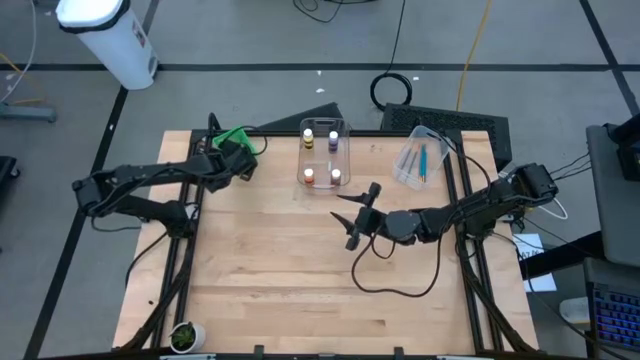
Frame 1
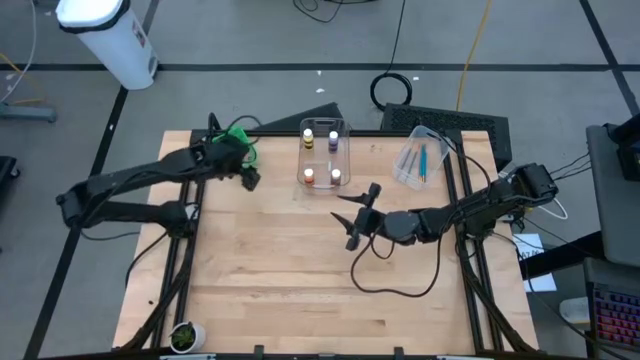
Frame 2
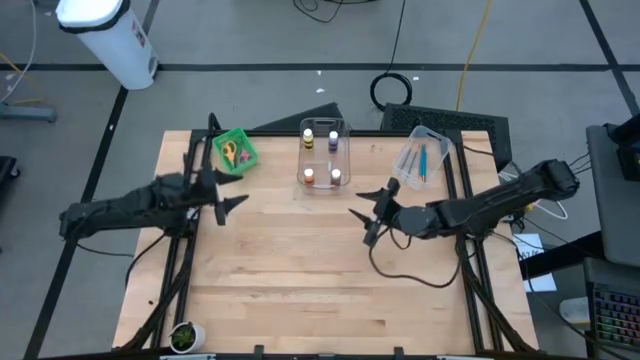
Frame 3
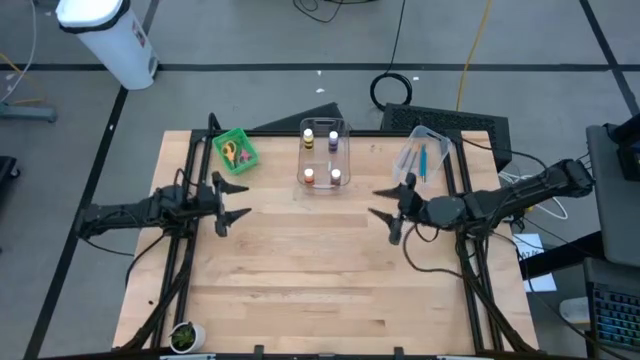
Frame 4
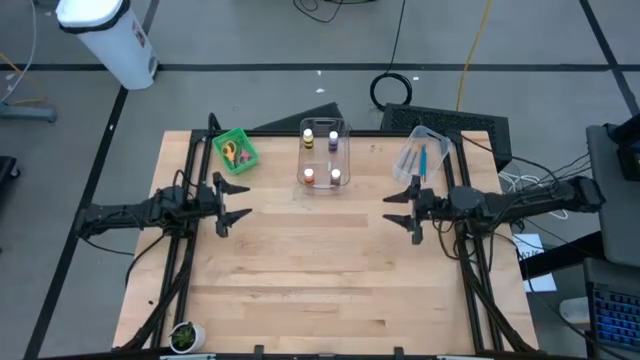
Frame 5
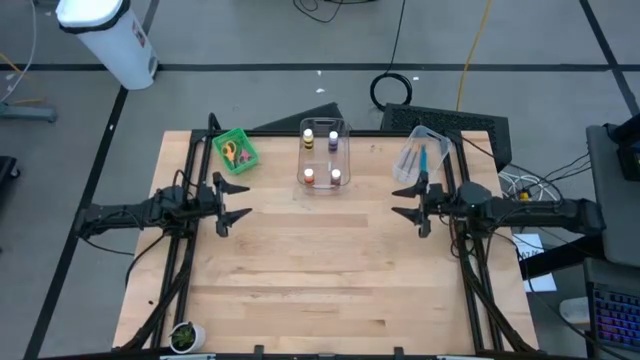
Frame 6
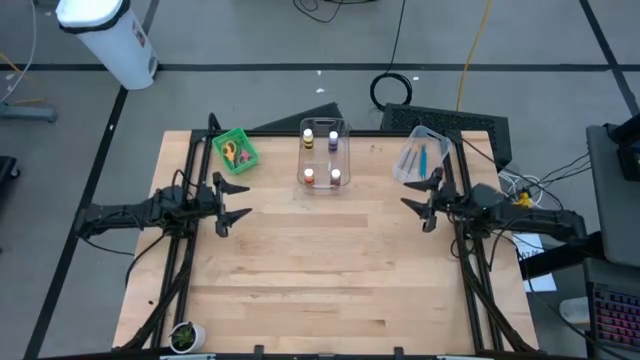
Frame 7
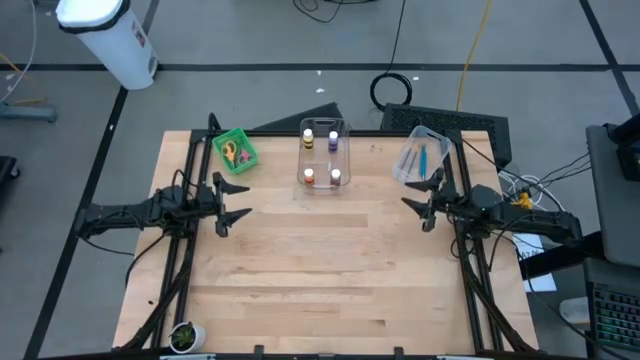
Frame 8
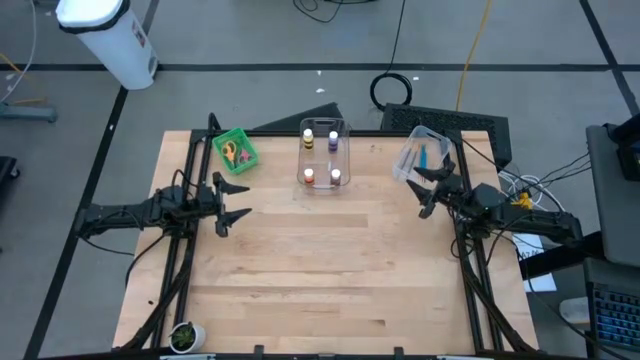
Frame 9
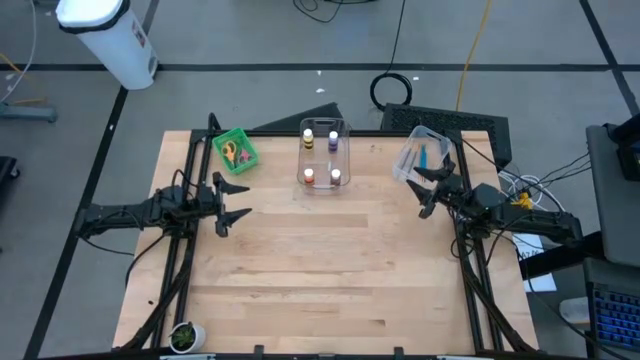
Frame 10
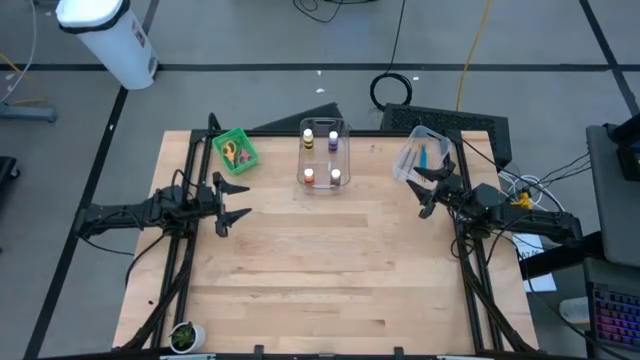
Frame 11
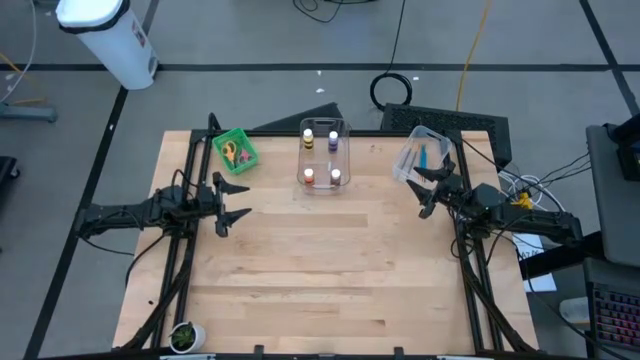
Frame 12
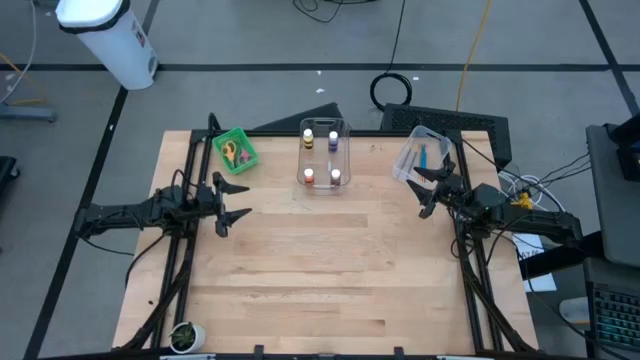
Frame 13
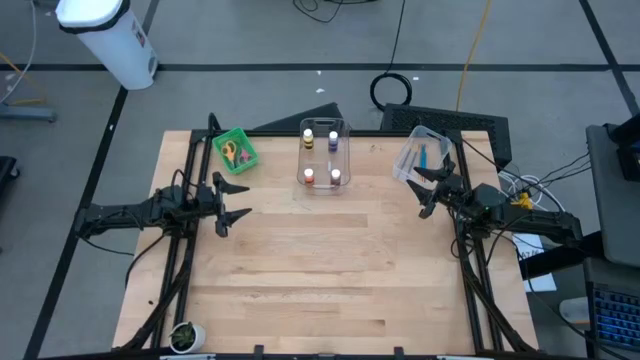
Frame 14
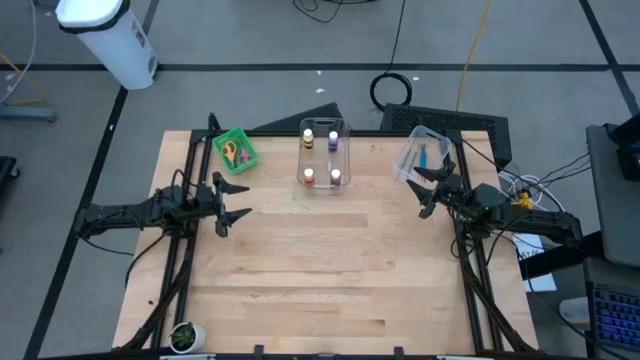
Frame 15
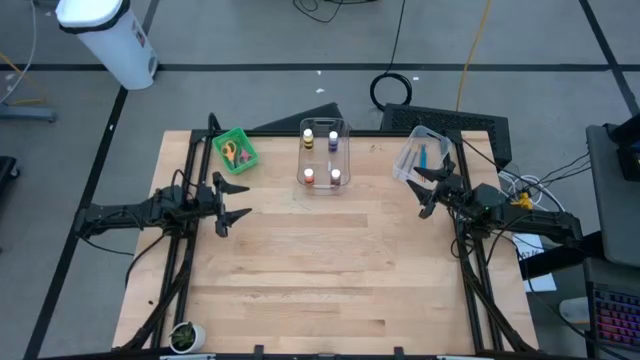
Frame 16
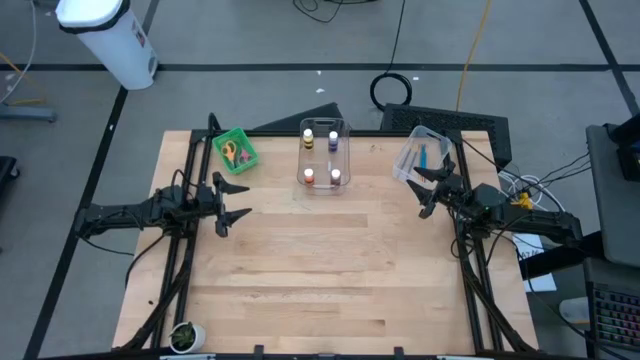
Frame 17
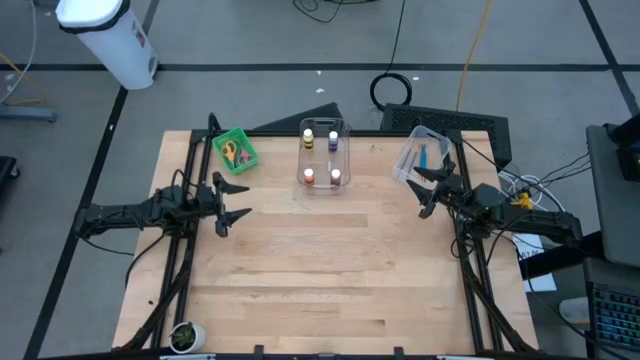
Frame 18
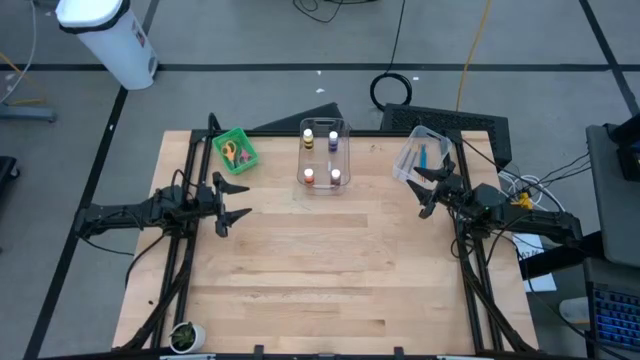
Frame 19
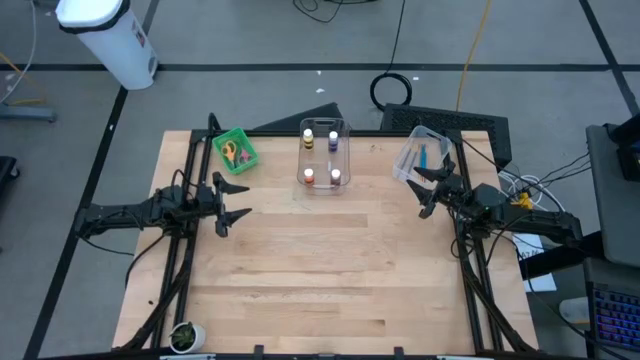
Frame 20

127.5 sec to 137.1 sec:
Task: Pick & Place Paint Supplies
Return to Home Position

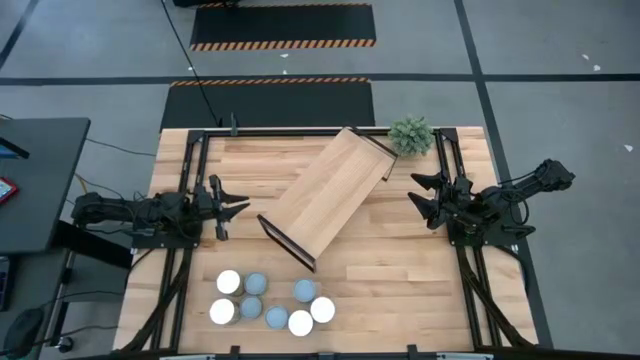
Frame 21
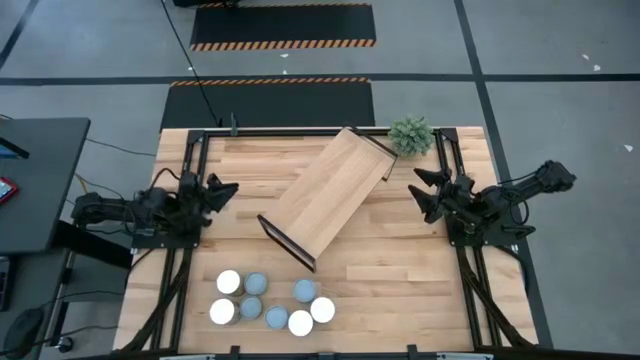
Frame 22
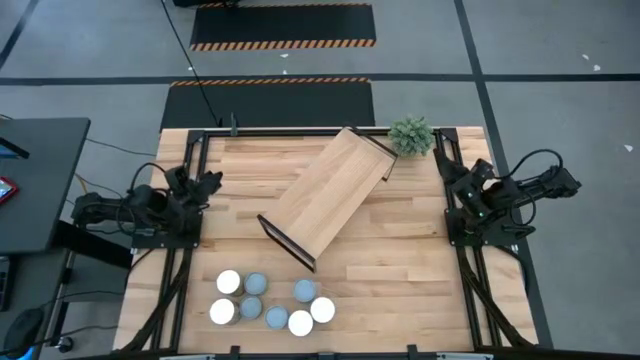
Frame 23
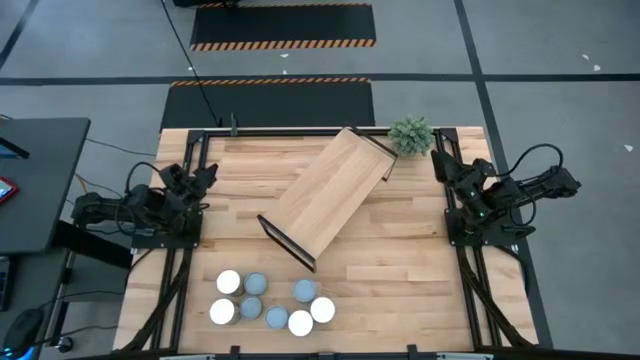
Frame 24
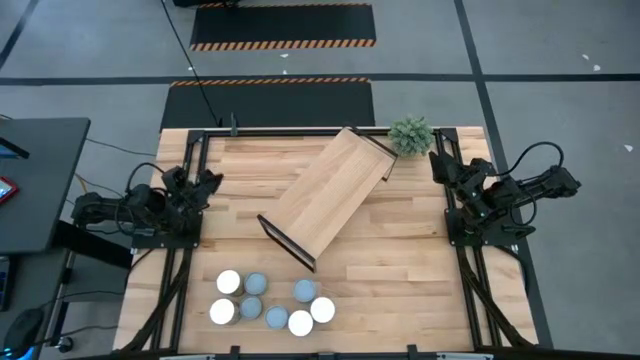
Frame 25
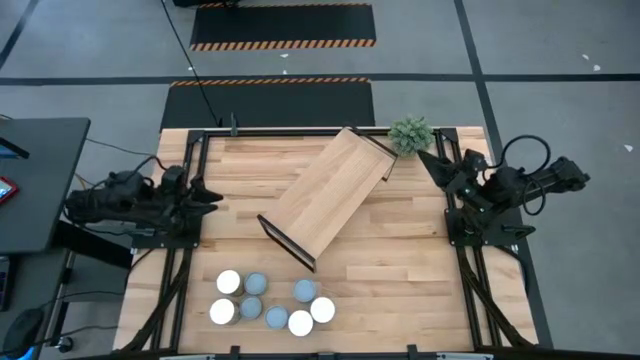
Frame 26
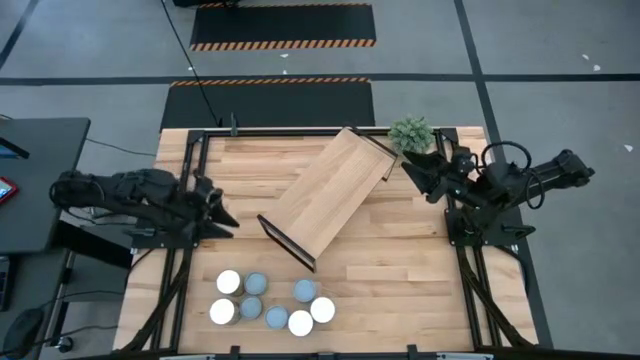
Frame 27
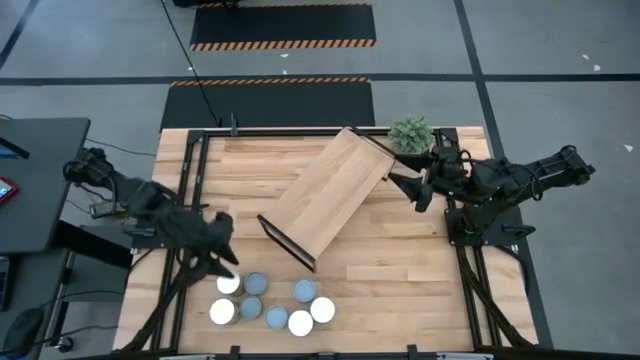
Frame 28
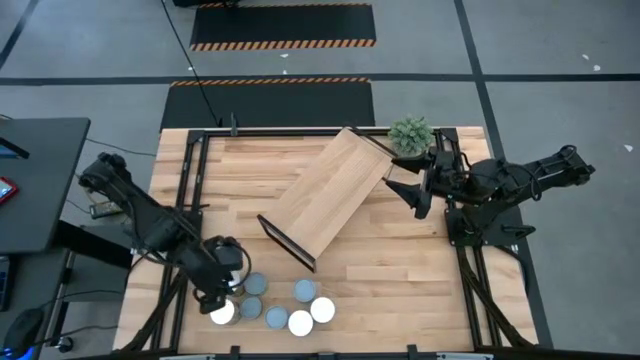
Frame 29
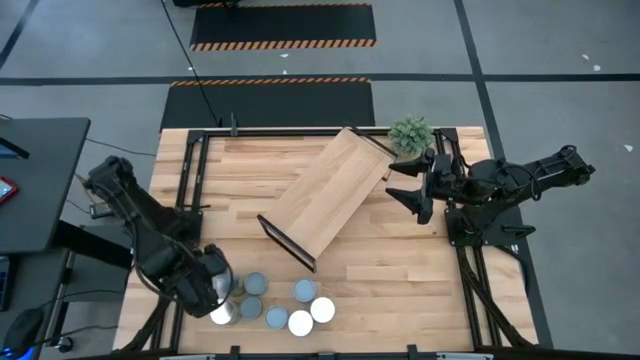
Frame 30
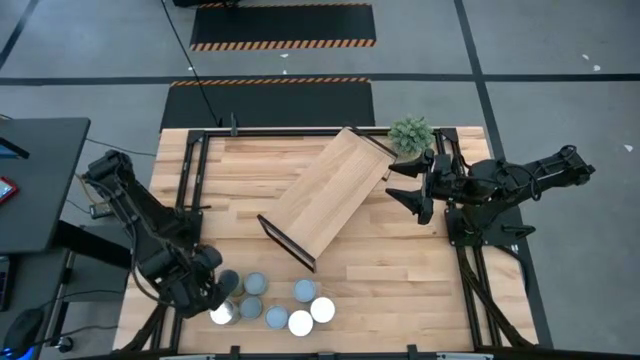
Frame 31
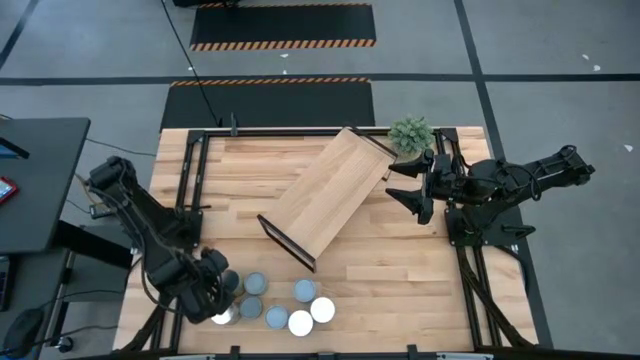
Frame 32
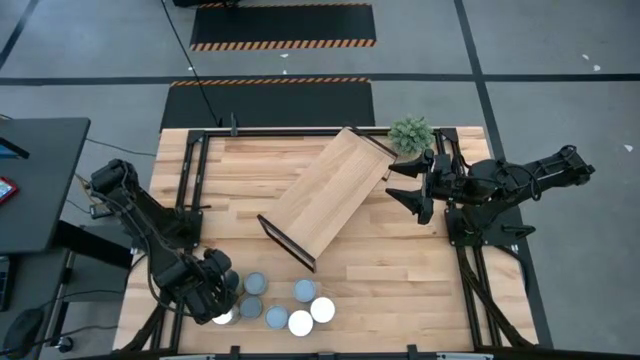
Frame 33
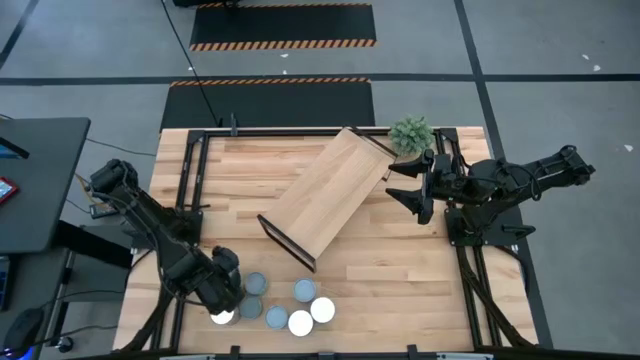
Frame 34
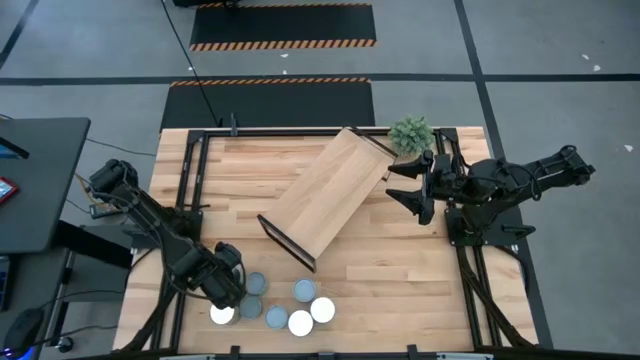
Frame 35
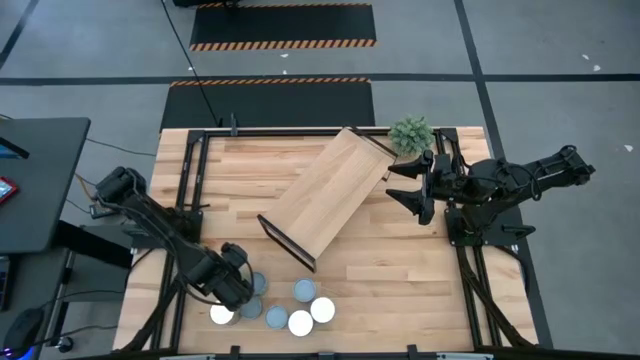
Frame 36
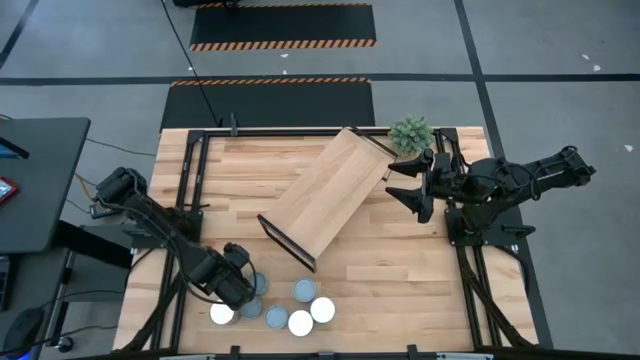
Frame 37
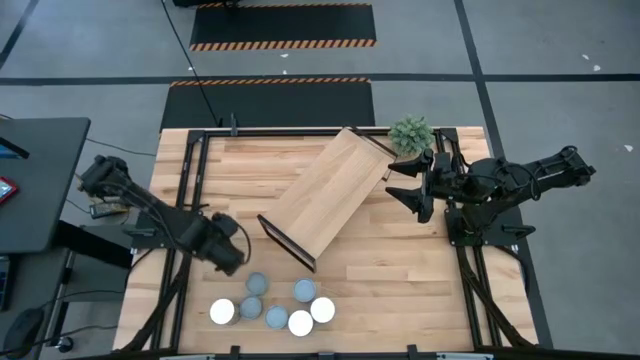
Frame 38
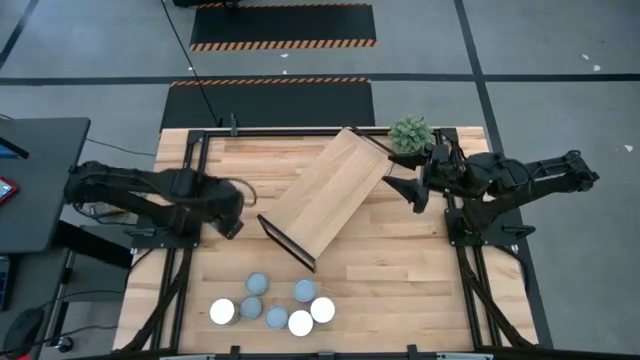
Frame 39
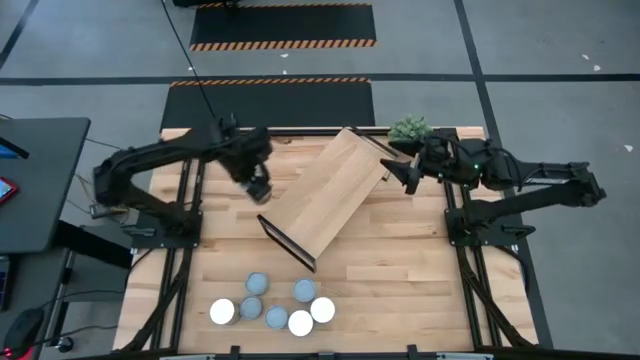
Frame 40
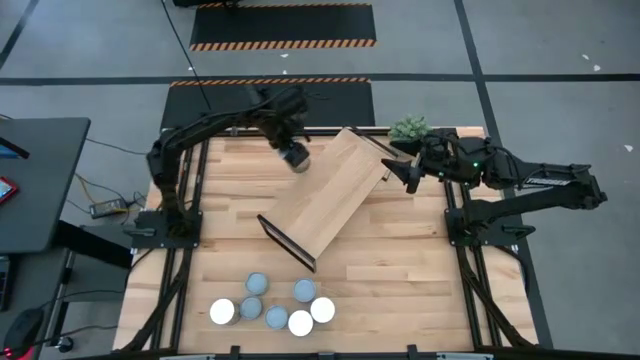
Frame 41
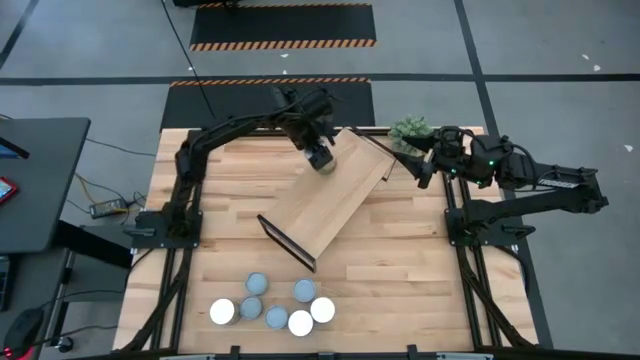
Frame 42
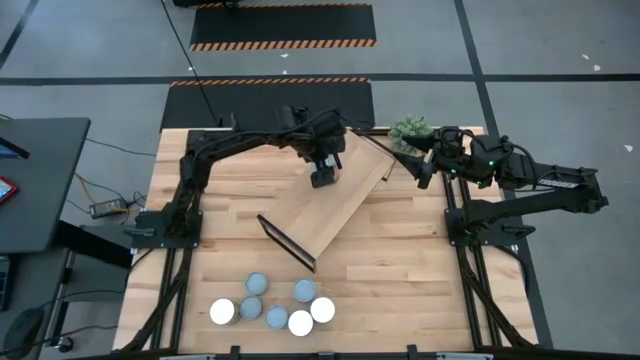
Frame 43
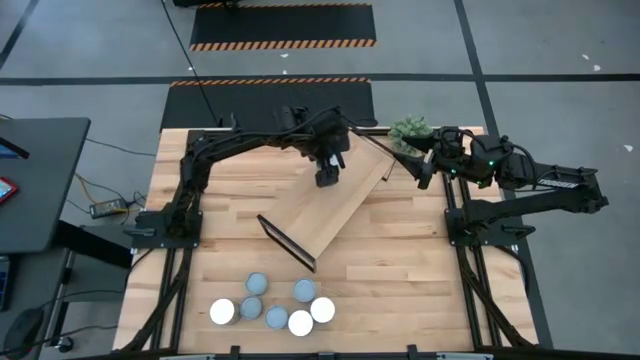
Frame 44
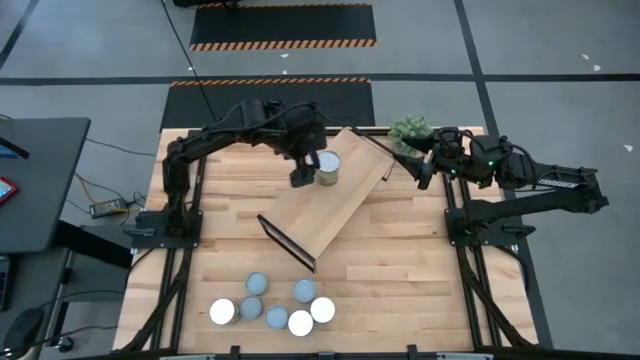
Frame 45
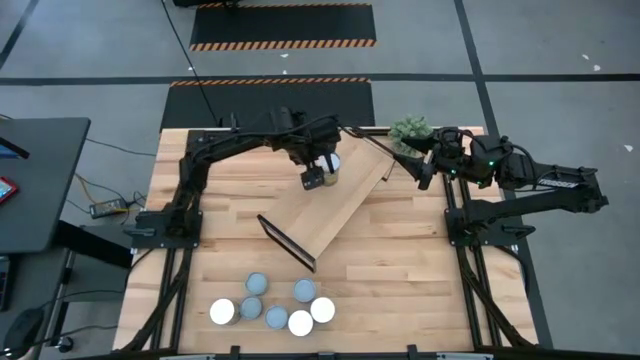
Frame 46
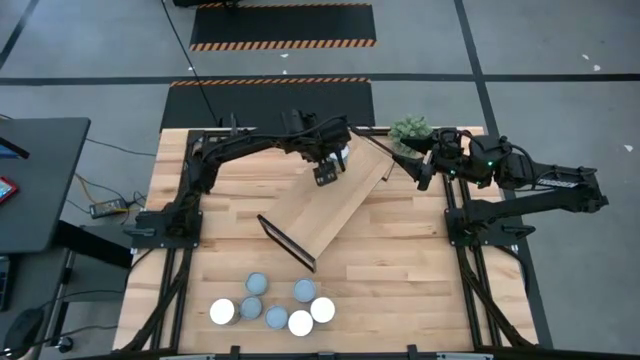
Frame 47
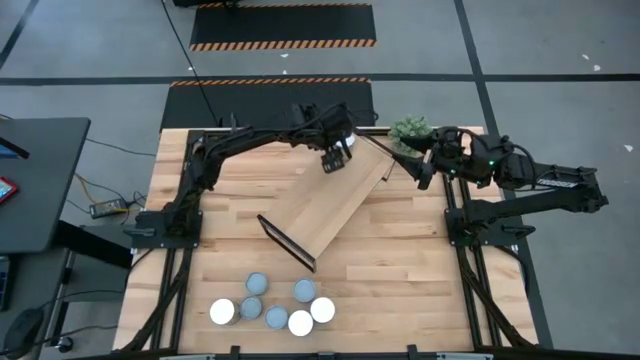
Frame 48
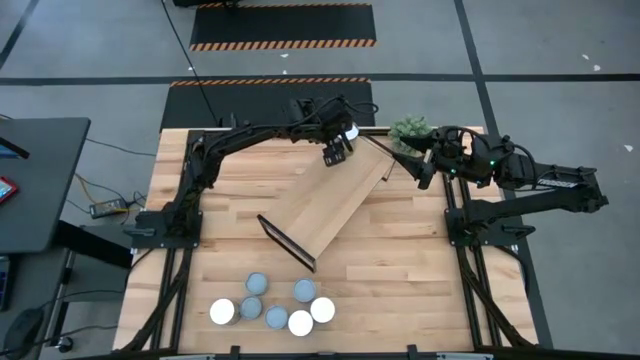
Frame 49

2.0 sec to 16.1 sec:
Task: Pick and place cans onto a shelf
Put the canned oranges on the shelf
